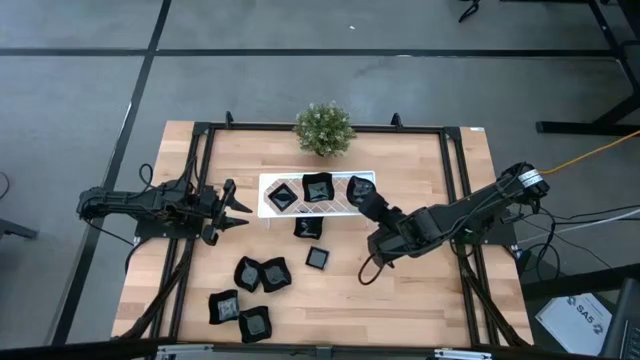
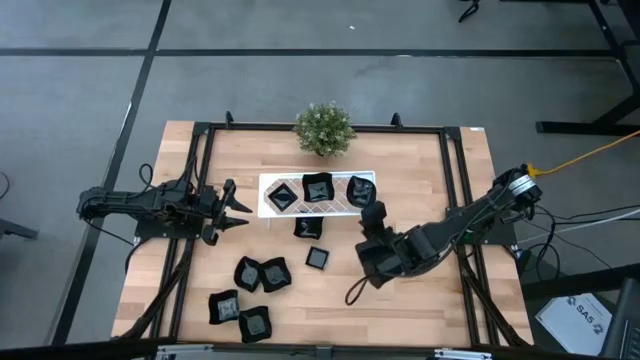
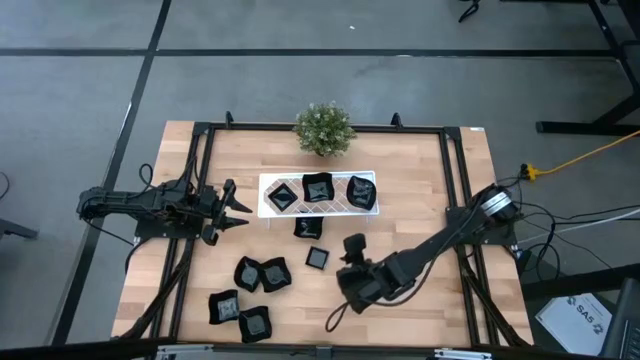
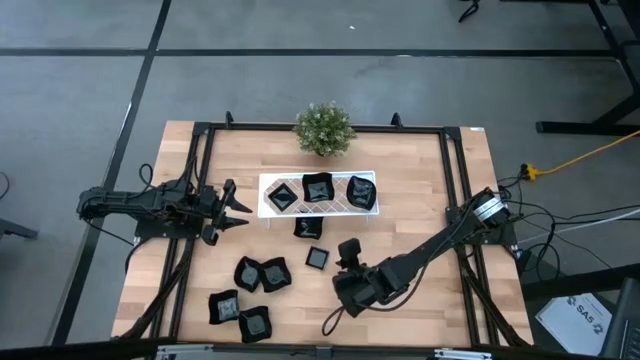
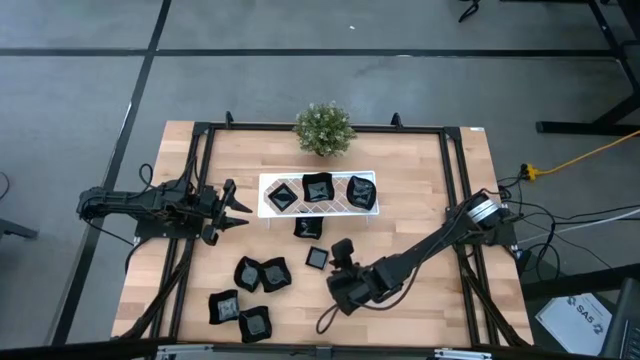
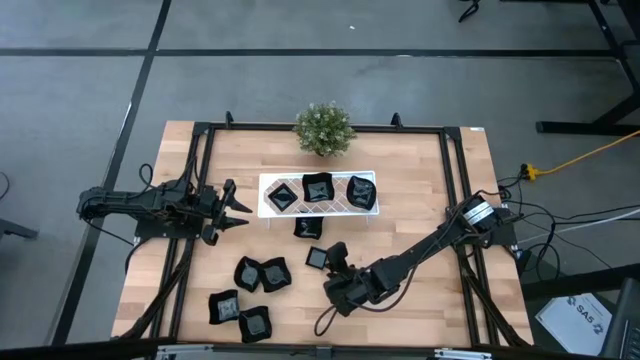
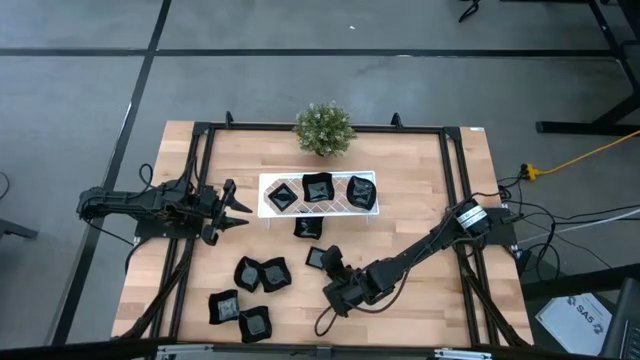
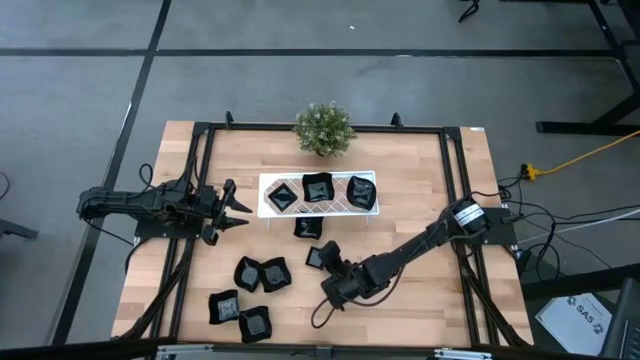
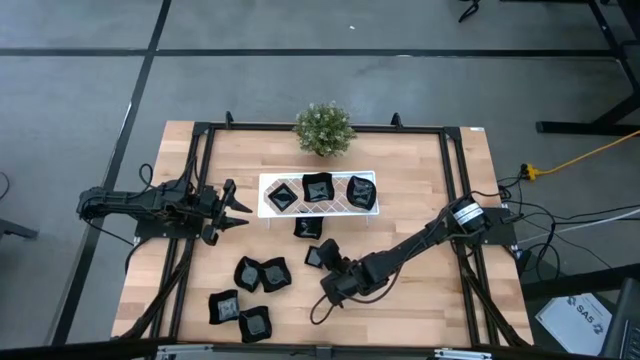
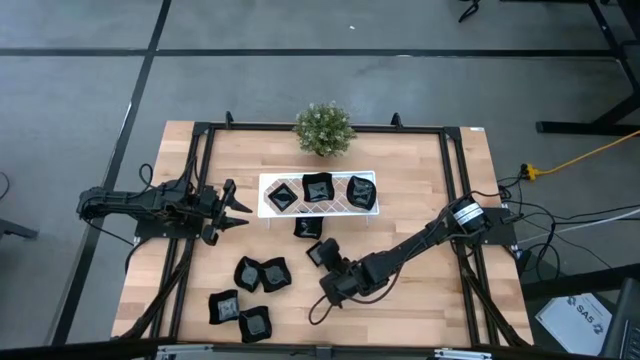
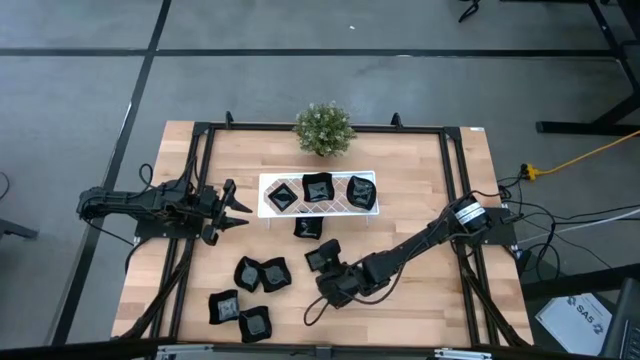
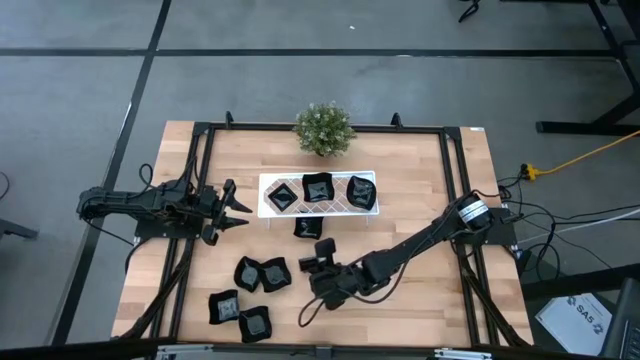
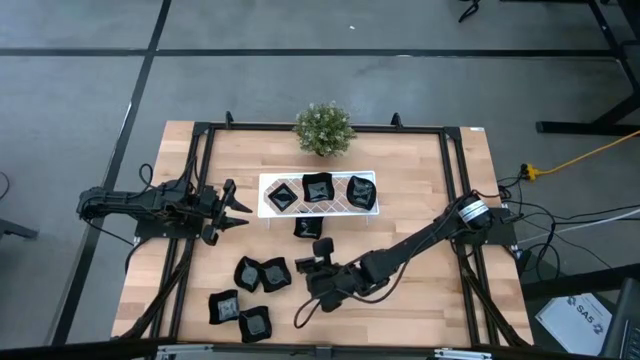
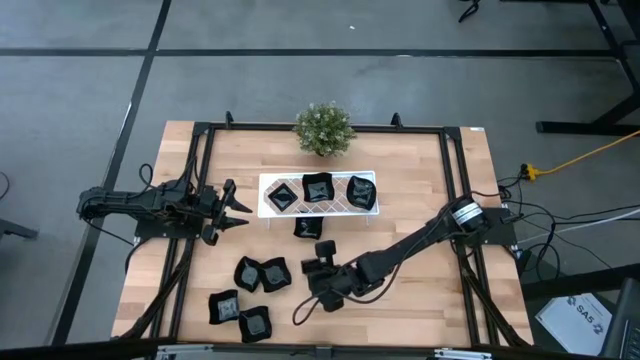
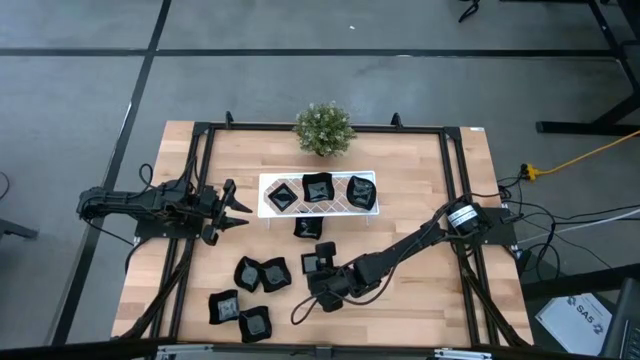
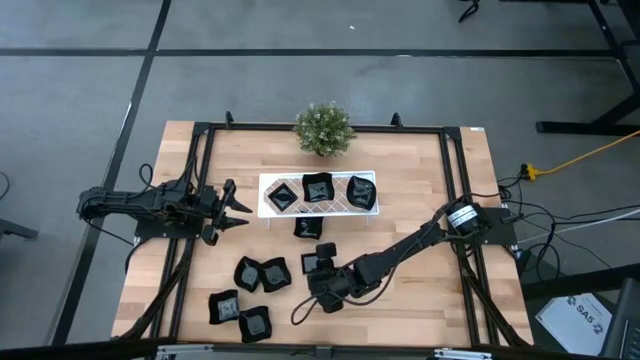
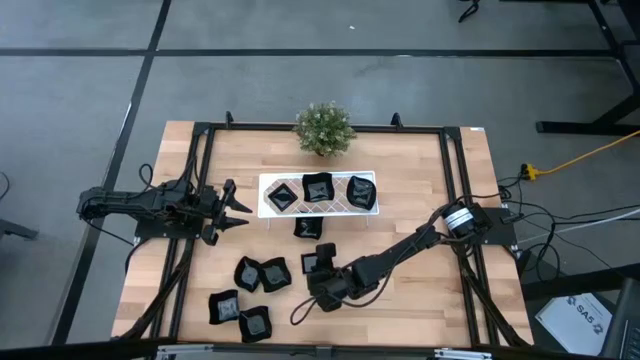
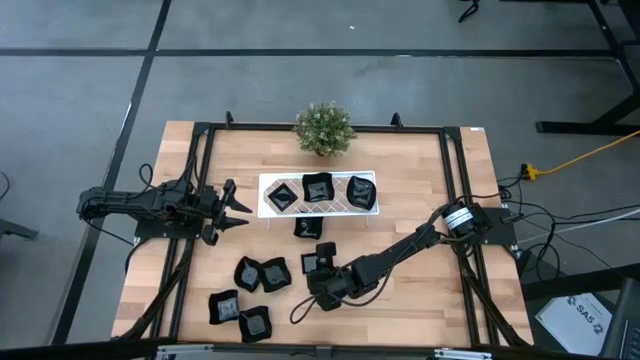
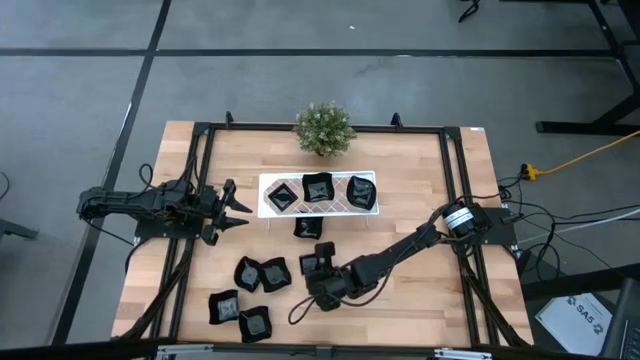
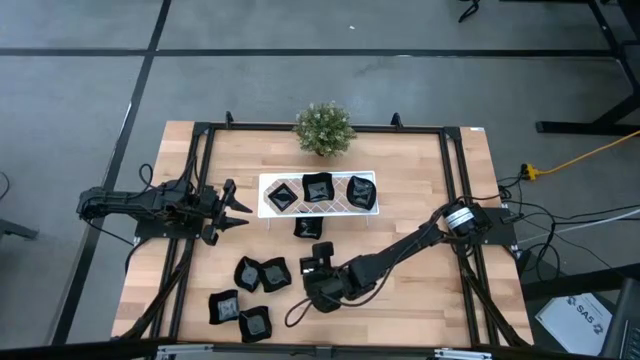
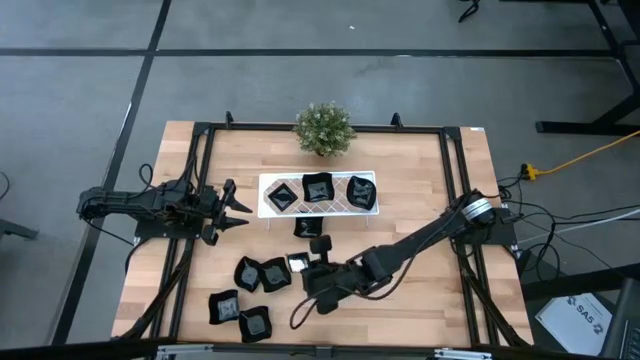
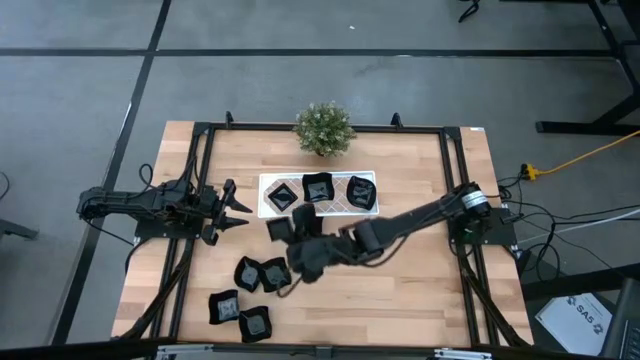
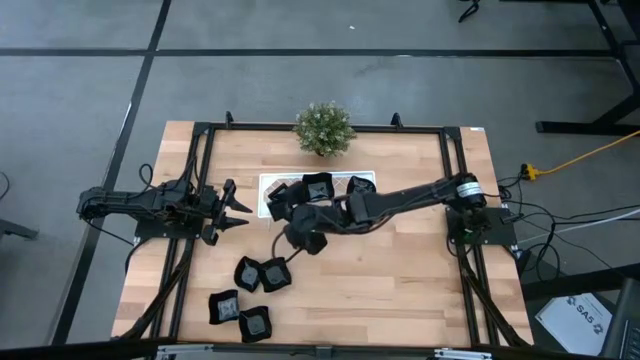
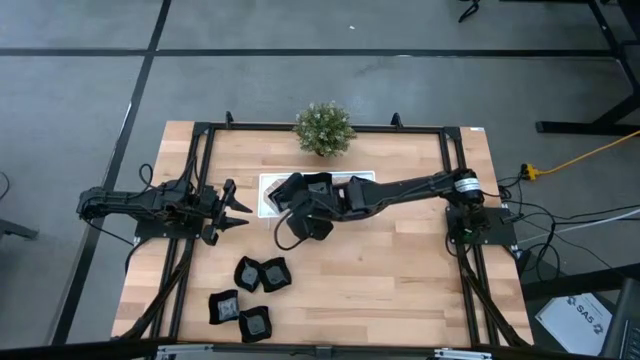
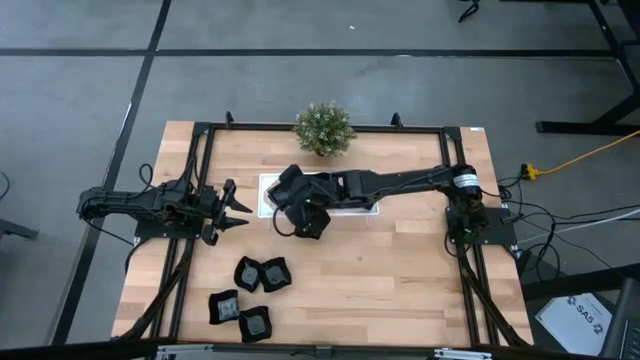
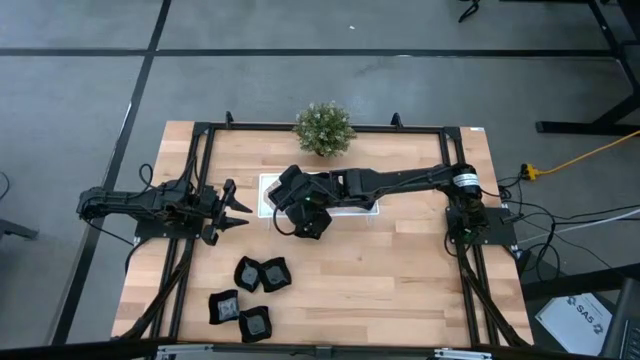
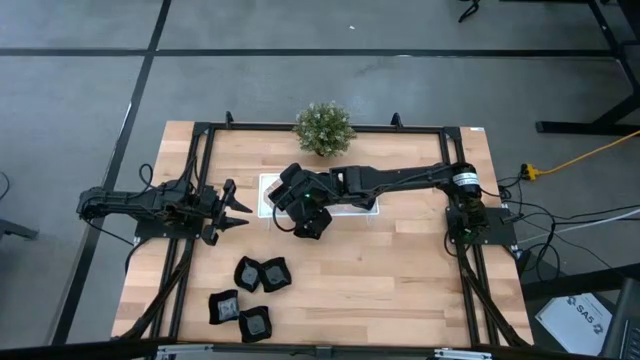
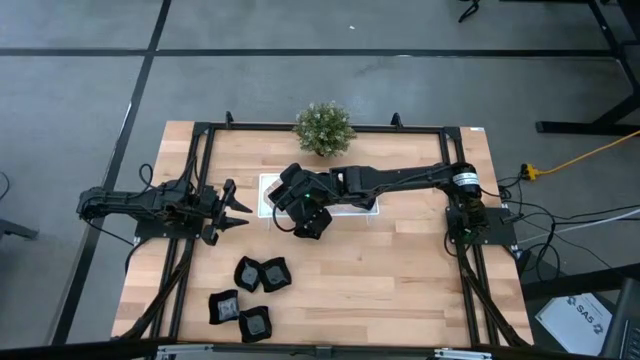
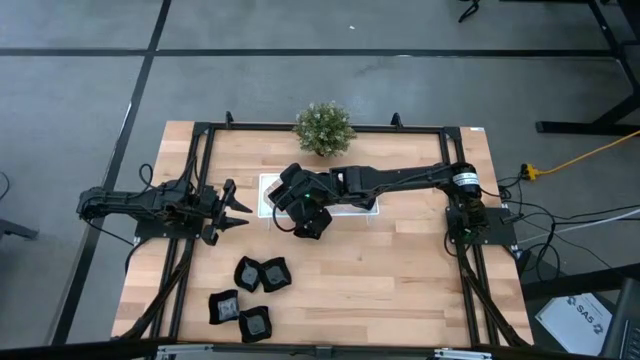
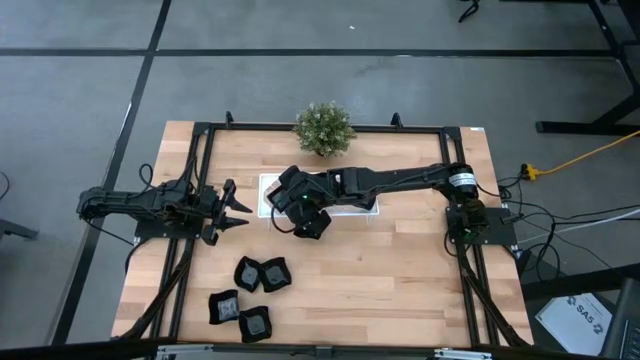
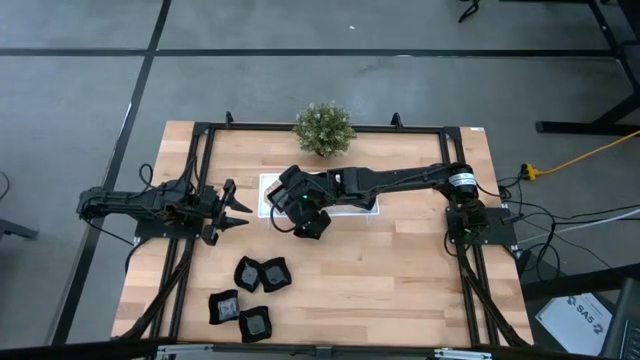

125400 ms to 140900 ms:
Task: Pick & Place Mini shaped plates
Stack the black square plate on top of the black square plate on the shelf

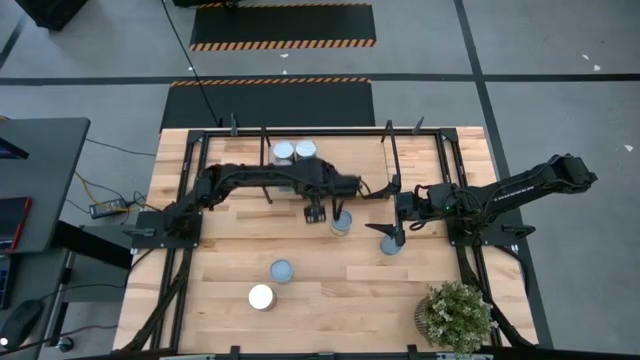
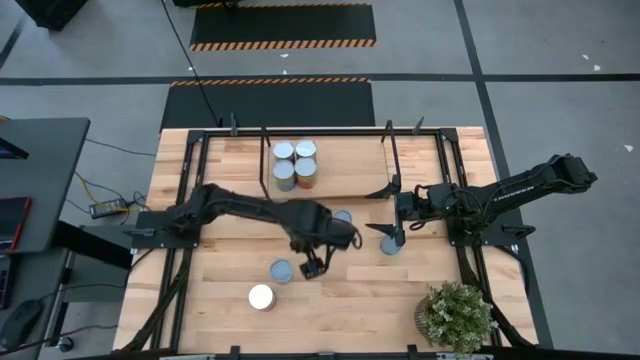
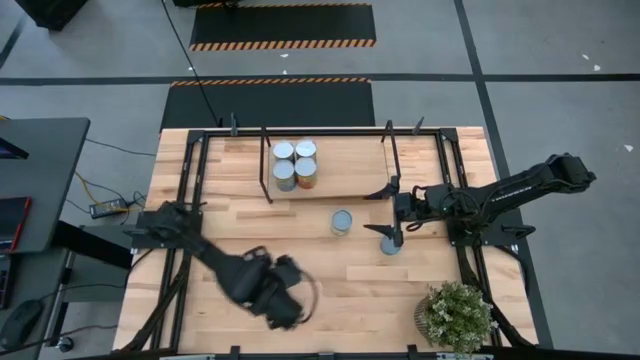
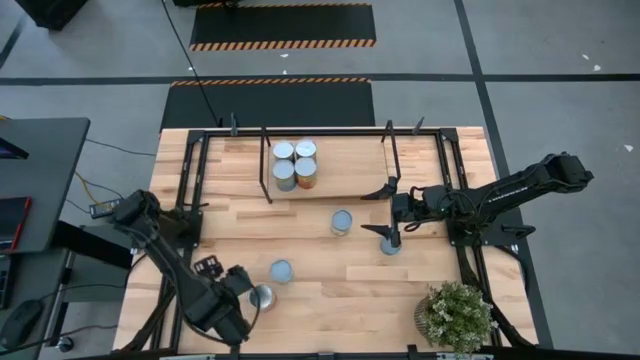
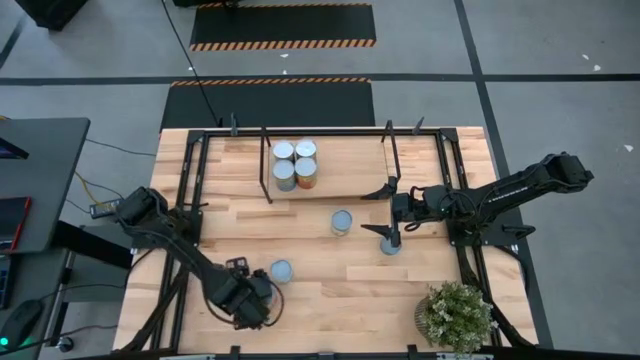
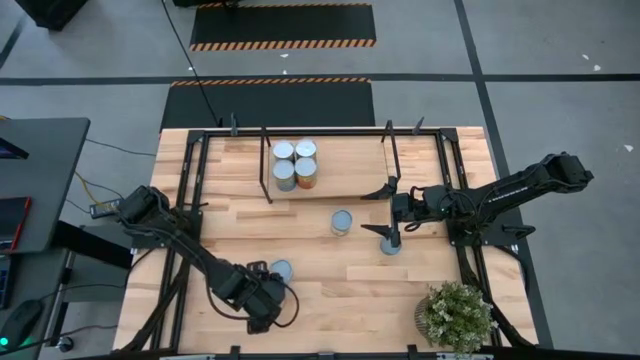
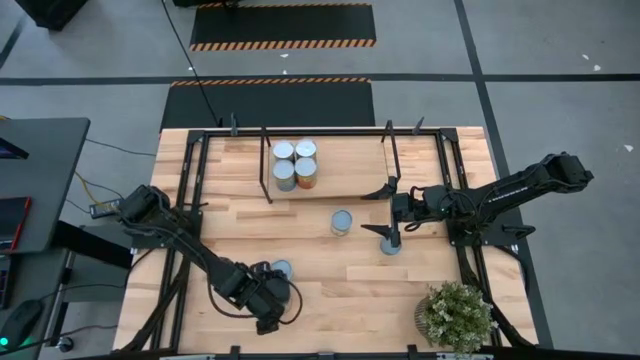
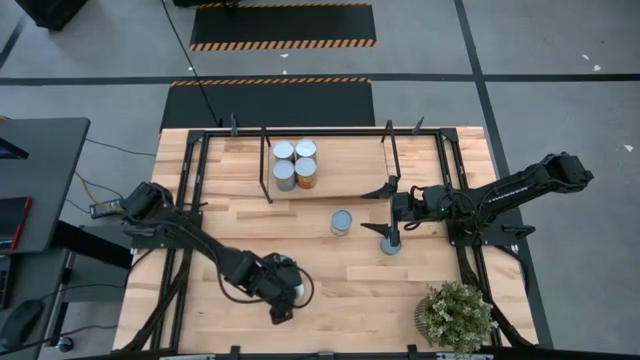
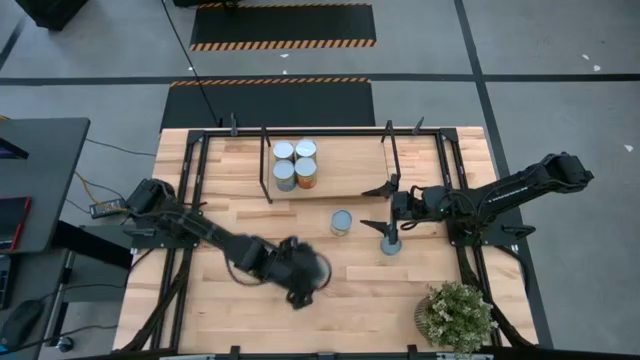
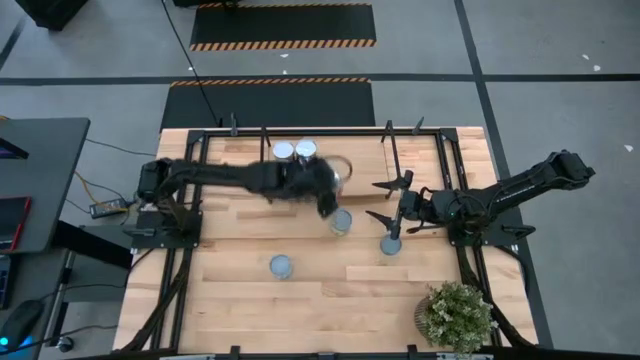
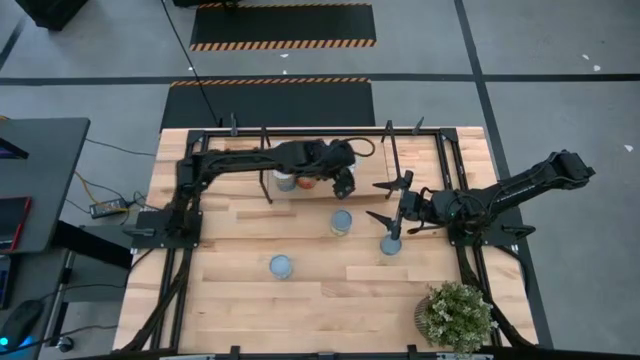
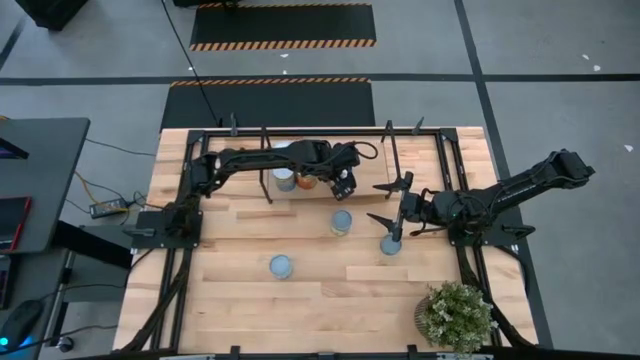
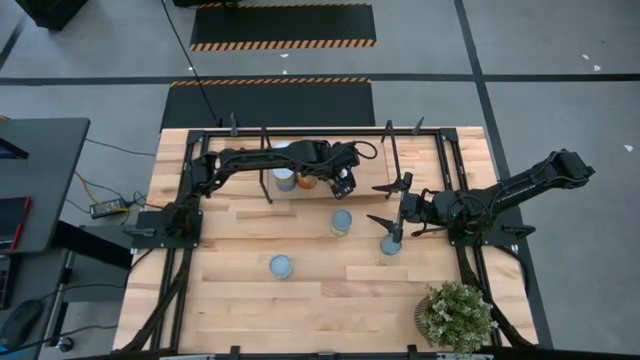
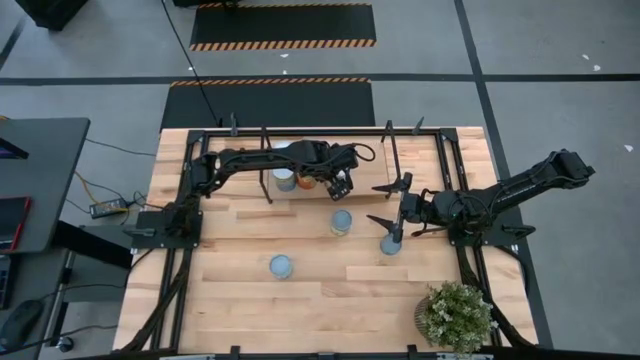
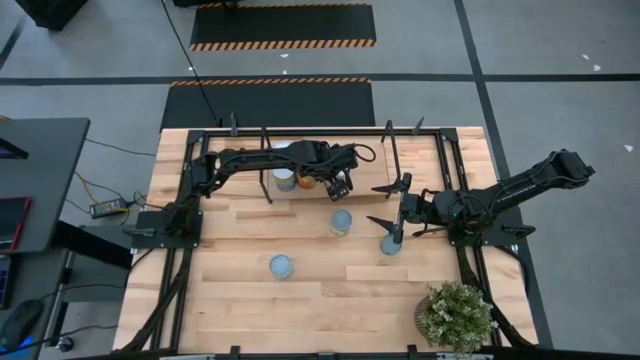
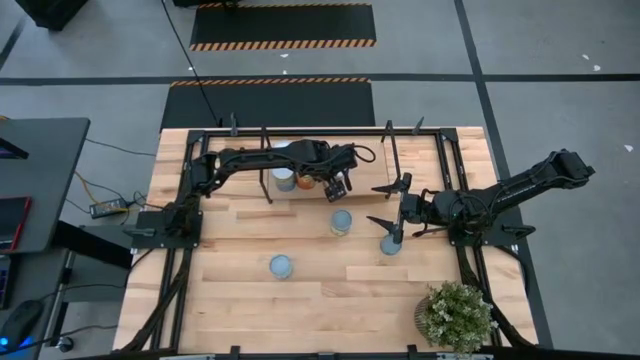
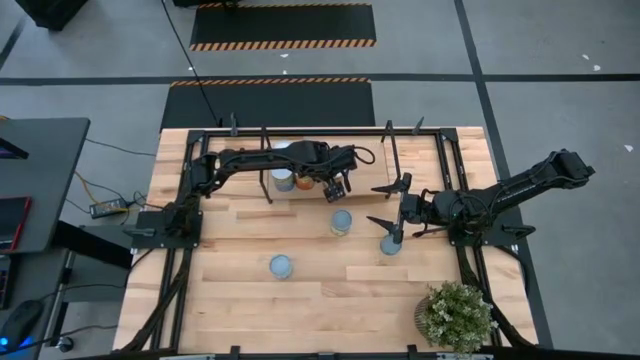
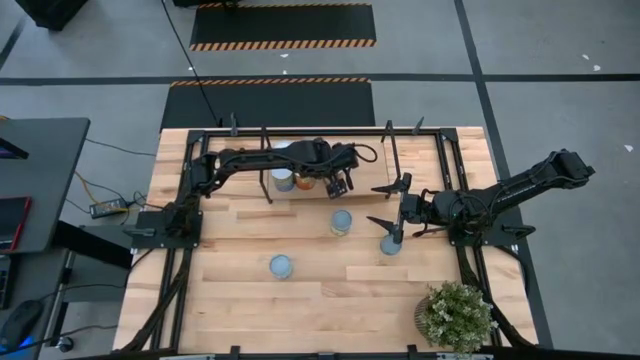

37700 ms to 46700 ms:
Task: Pick and place cans onto a shelf
Put the canned corn on the shelf
